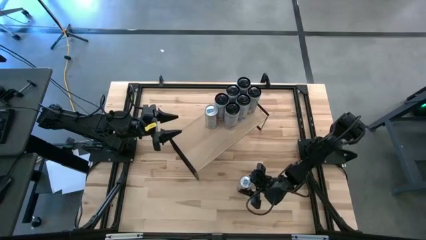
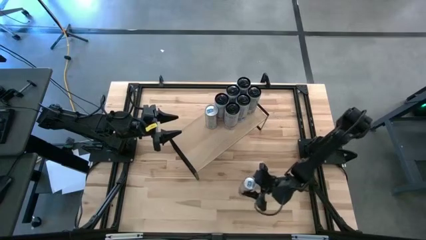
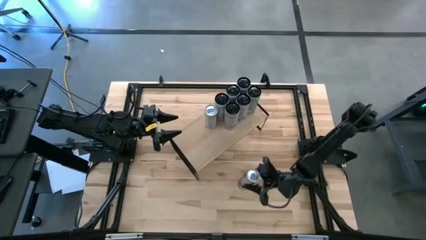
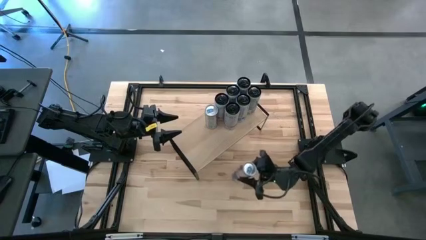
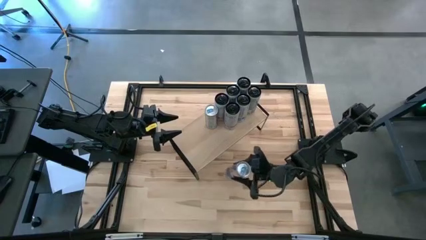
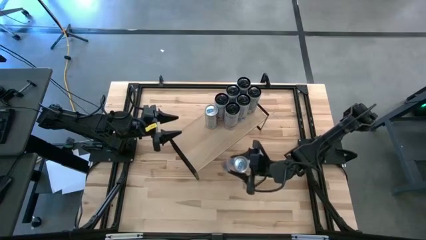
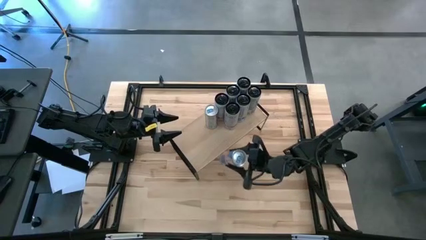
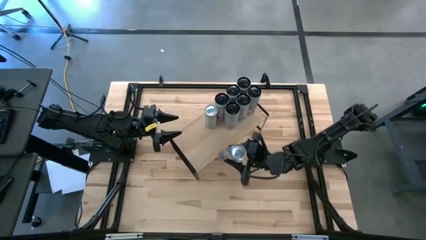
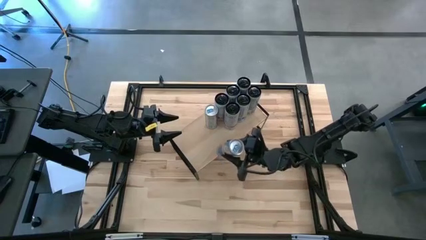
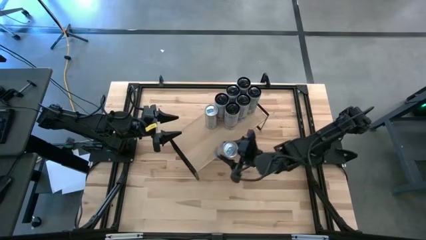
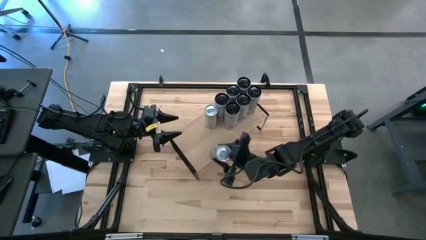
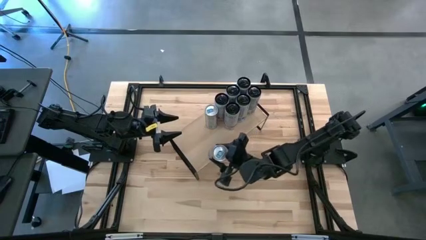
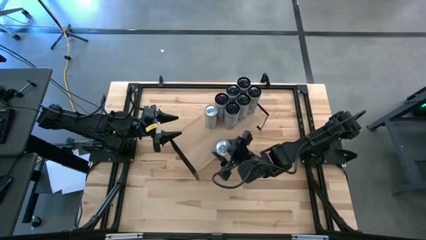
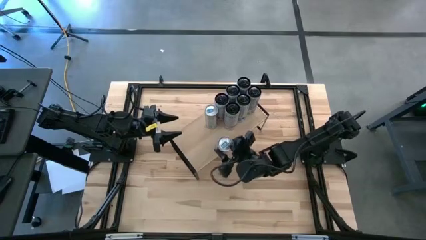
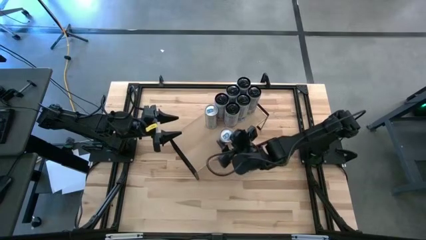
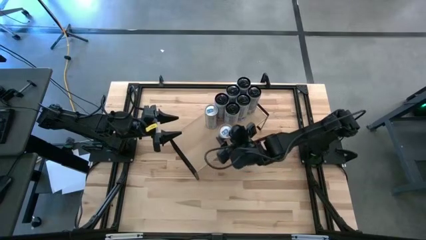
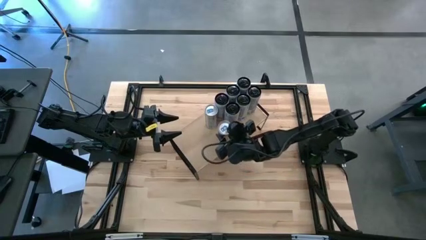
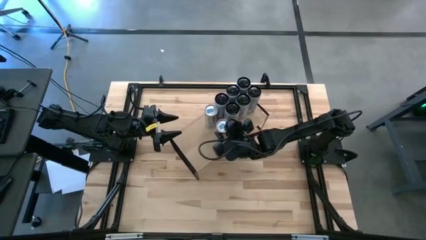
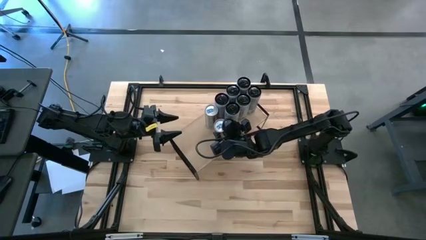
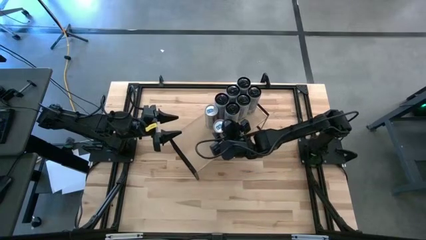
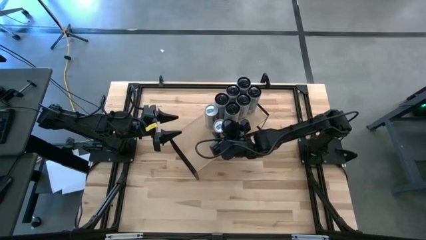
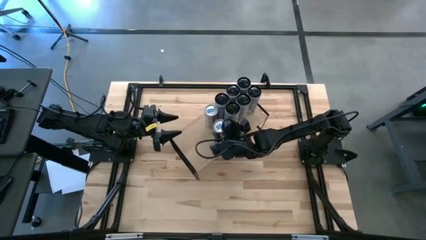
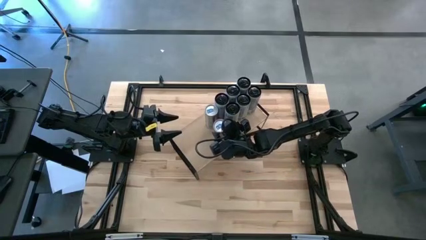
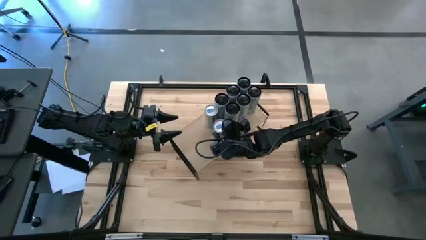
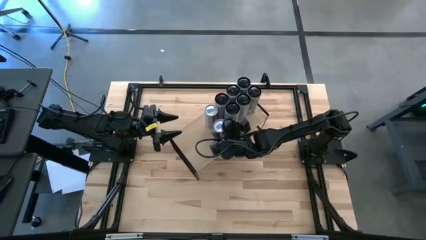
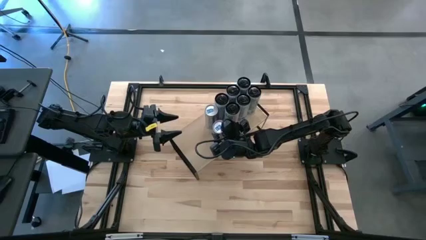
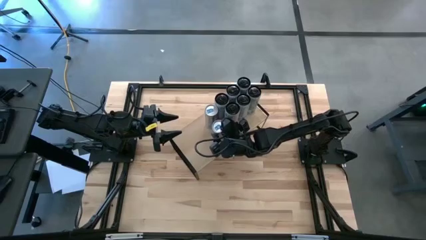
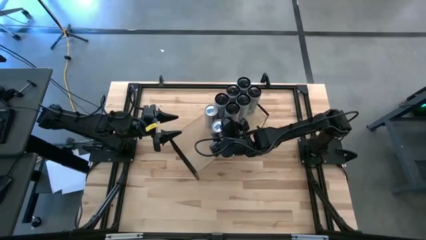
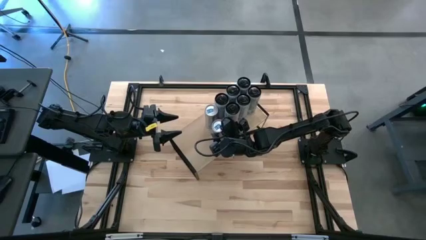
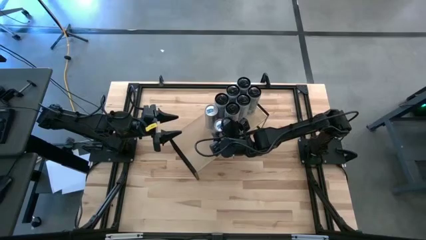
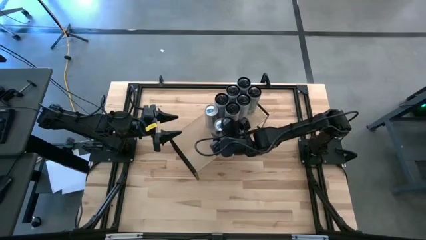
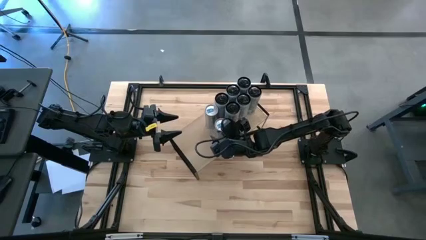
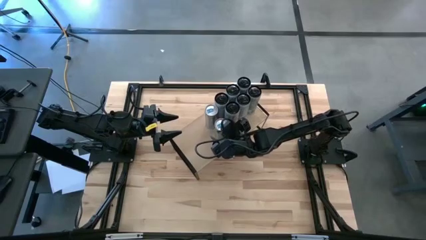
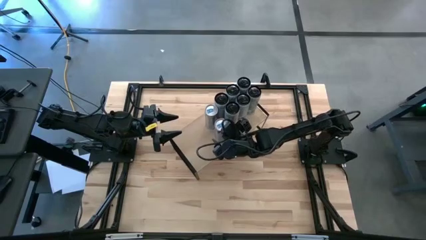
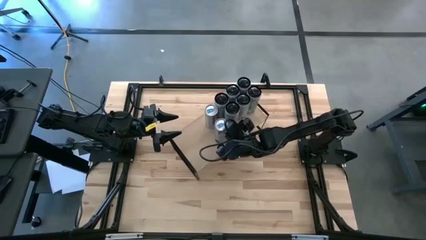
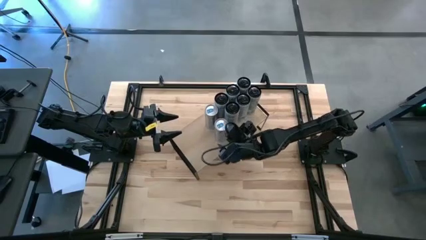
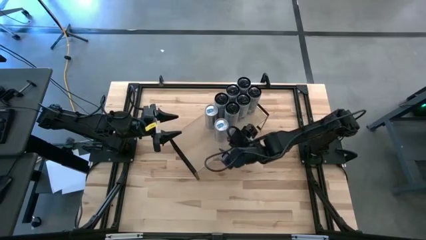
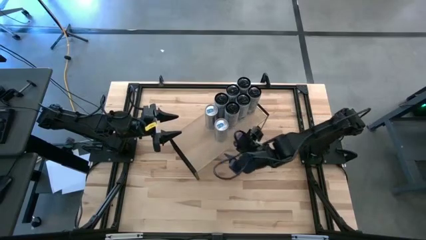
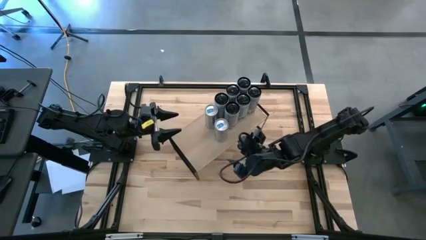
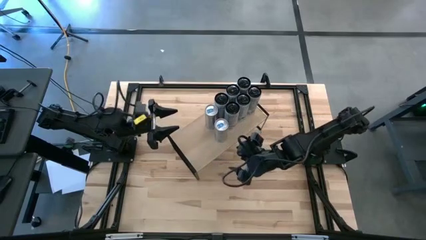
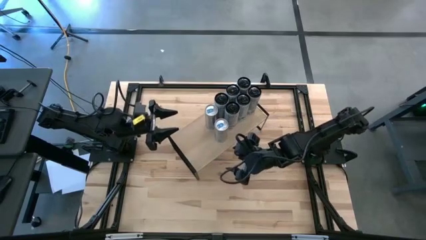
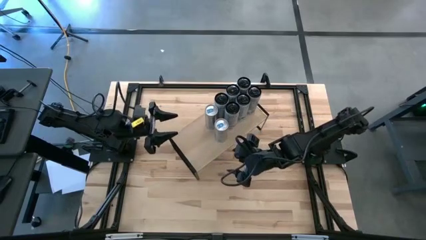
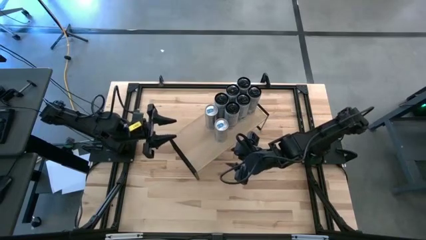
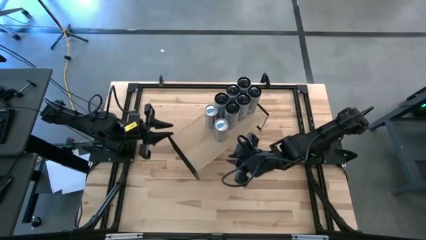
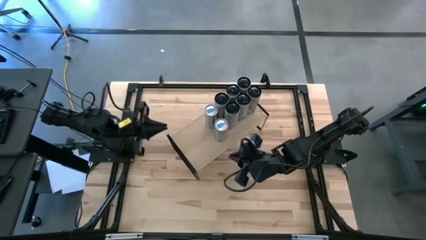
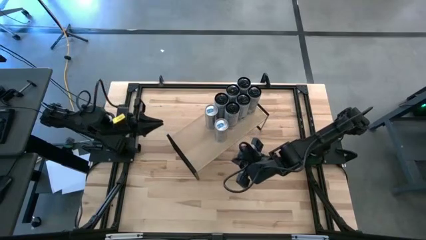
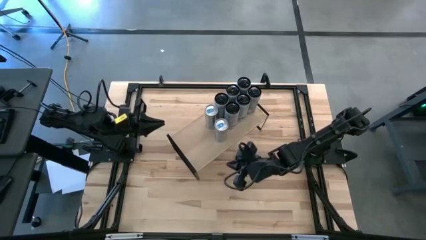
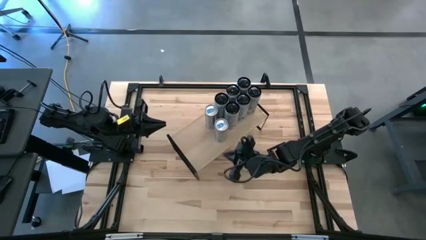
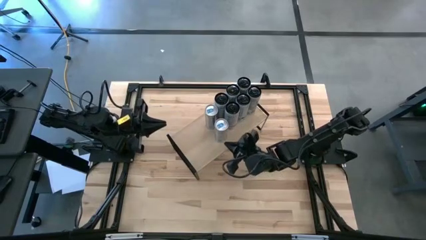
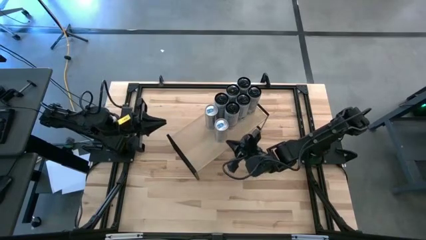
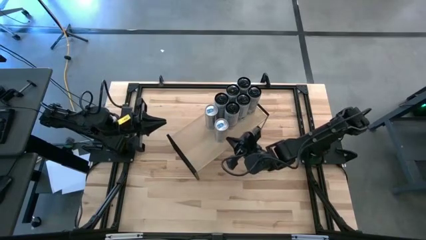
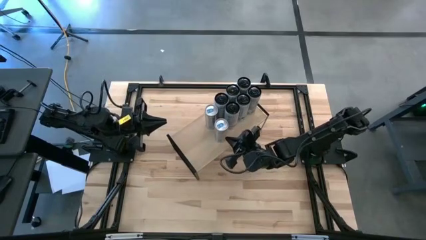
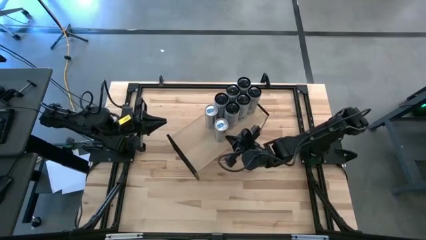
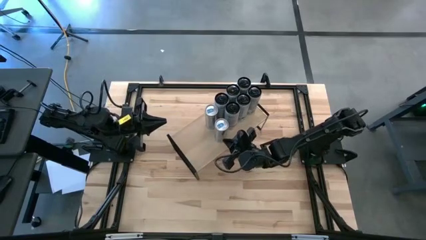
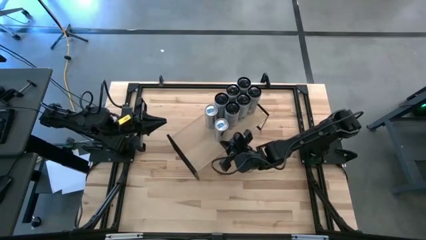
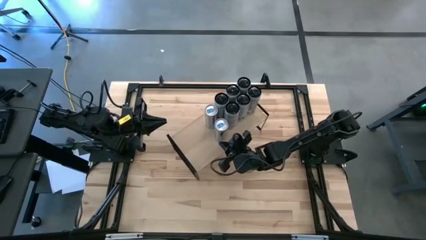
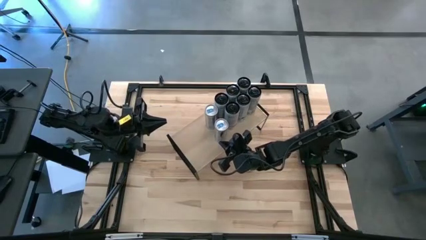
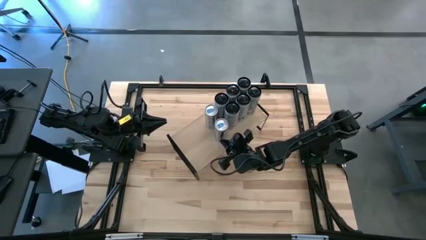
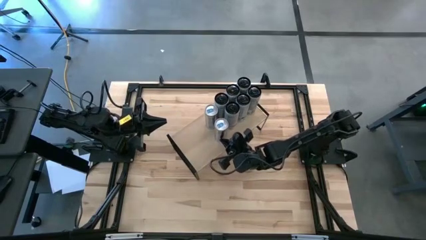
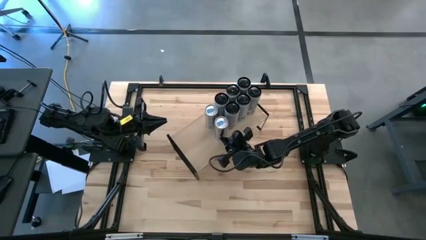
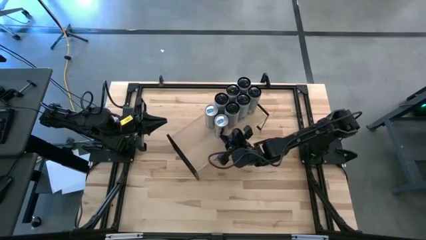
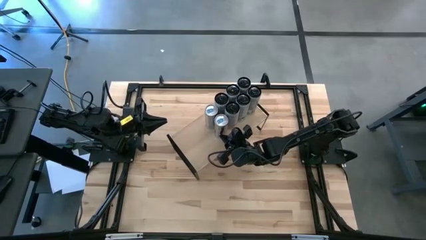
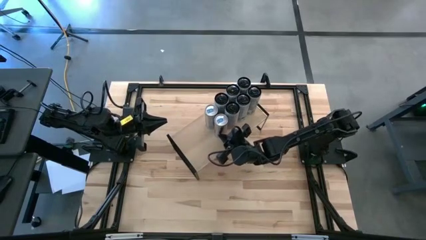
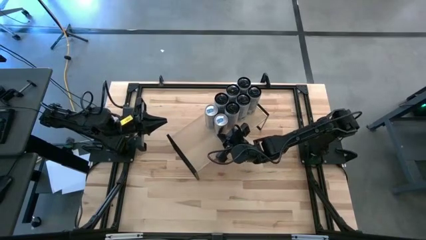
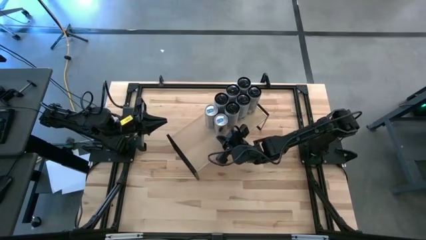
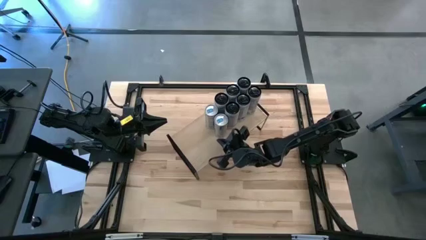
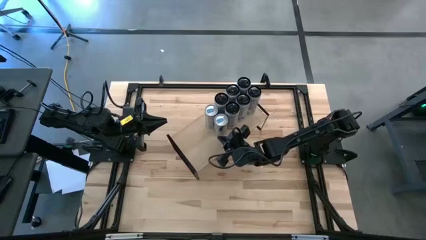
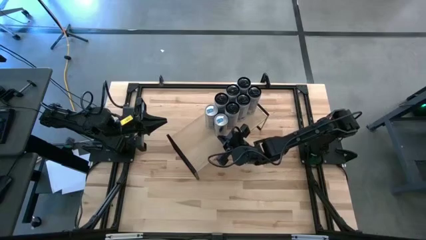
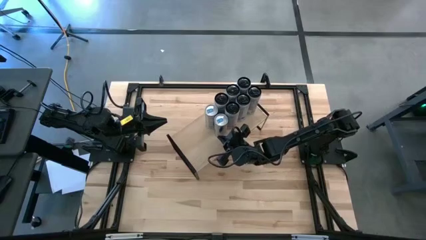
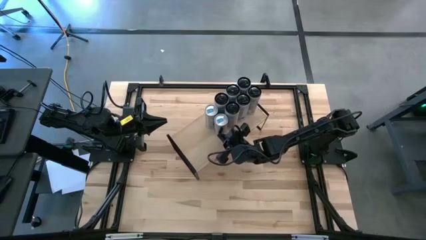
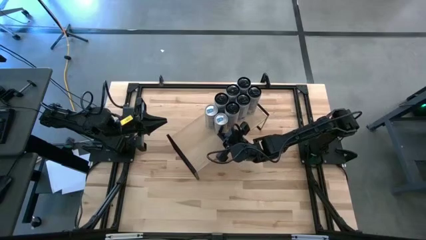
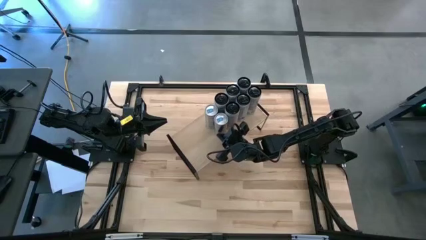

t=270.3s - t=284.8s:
Task: Place canned beverage on shelf
Put the blue soda can on the shelf and align it with the other blue soda can
